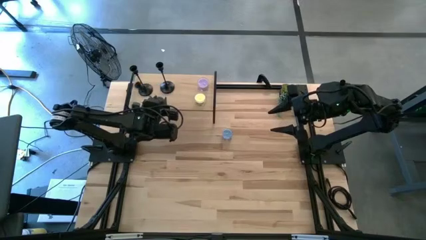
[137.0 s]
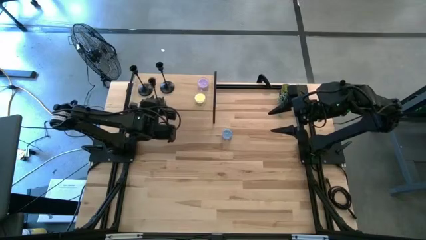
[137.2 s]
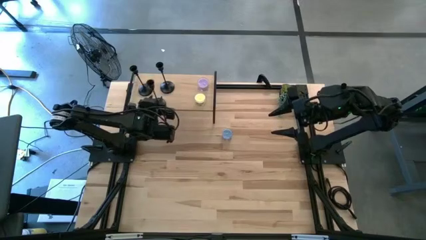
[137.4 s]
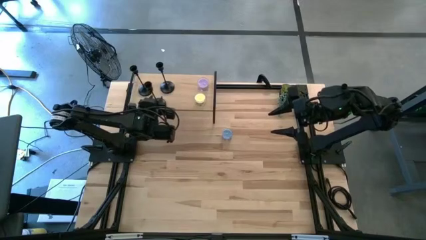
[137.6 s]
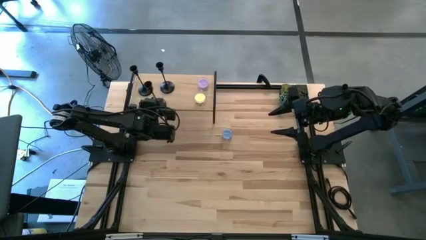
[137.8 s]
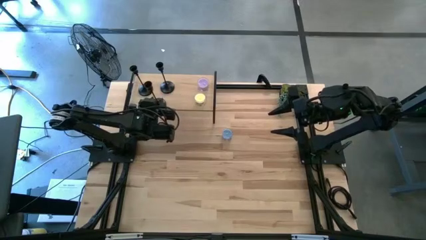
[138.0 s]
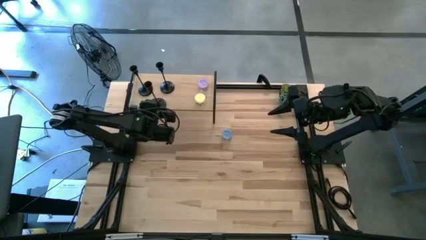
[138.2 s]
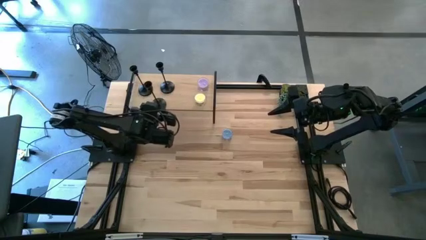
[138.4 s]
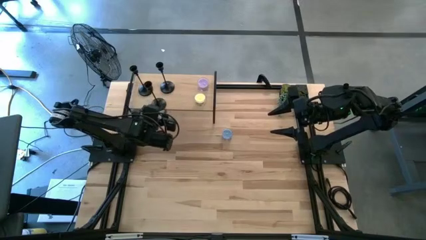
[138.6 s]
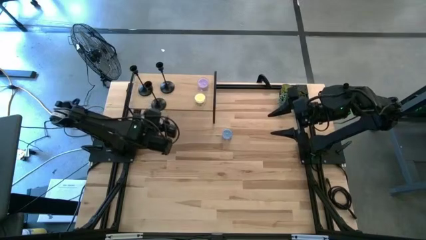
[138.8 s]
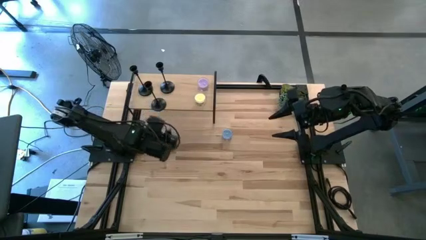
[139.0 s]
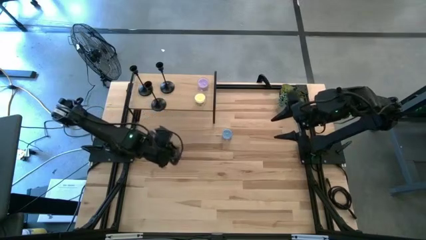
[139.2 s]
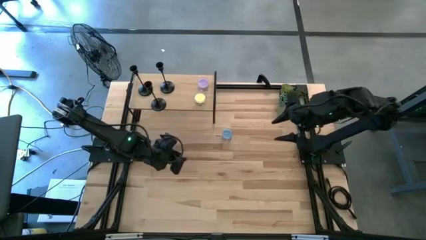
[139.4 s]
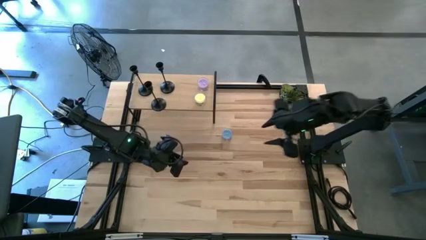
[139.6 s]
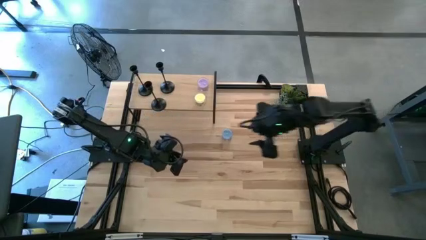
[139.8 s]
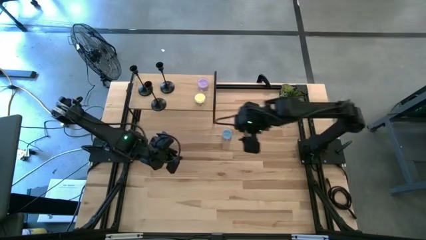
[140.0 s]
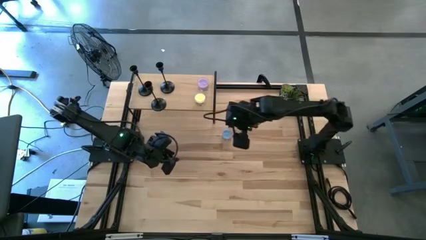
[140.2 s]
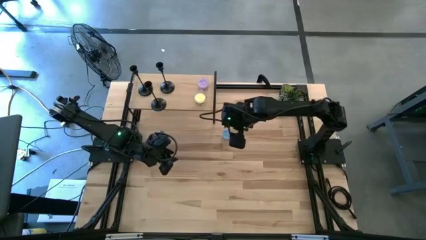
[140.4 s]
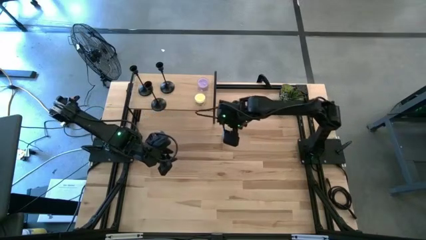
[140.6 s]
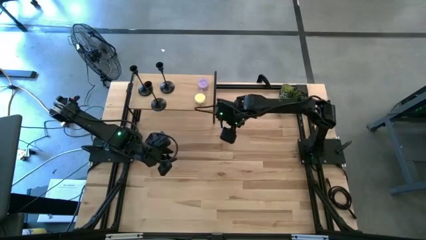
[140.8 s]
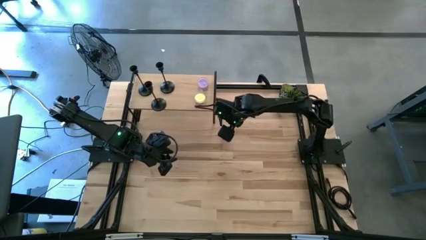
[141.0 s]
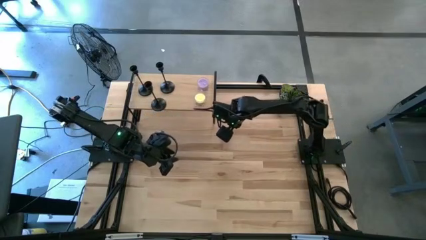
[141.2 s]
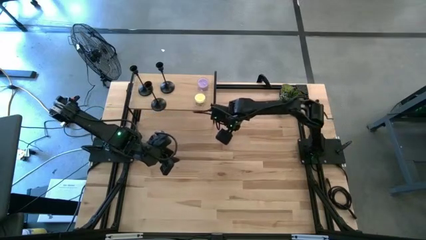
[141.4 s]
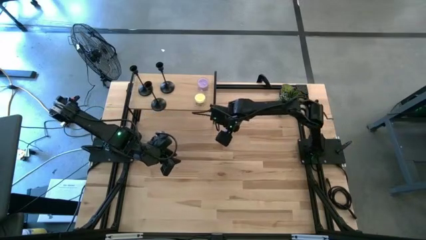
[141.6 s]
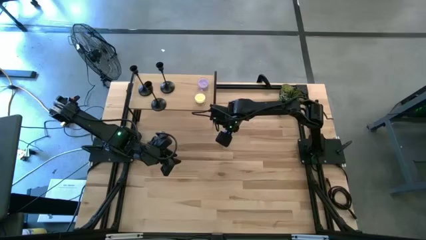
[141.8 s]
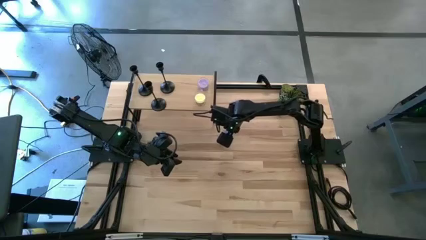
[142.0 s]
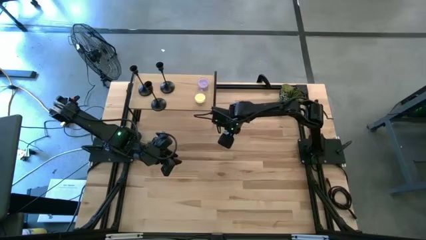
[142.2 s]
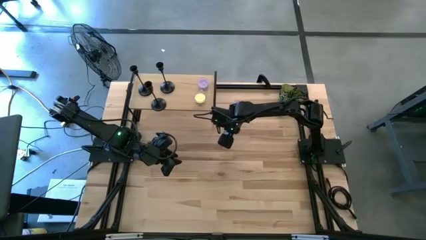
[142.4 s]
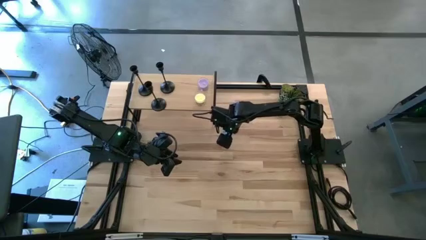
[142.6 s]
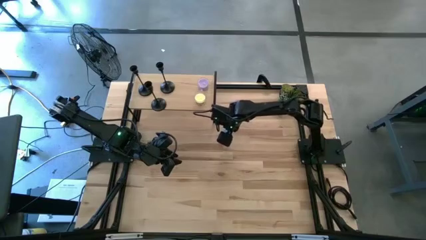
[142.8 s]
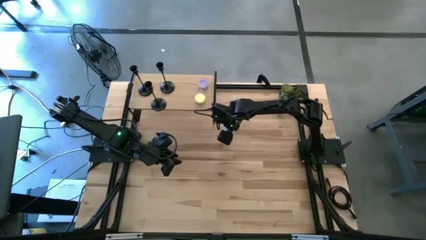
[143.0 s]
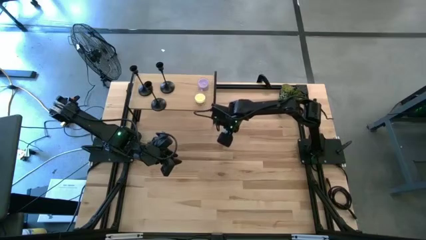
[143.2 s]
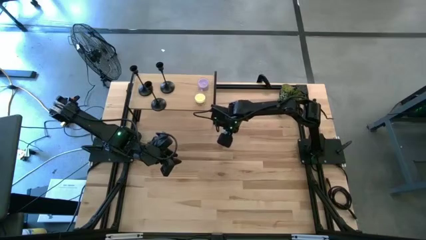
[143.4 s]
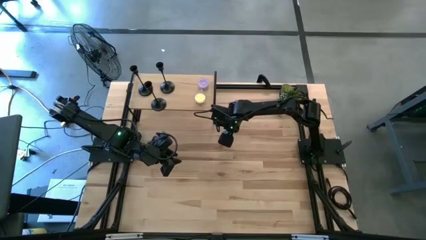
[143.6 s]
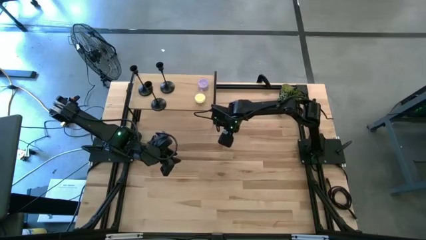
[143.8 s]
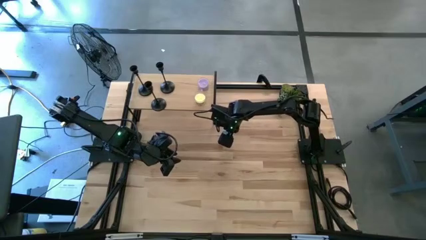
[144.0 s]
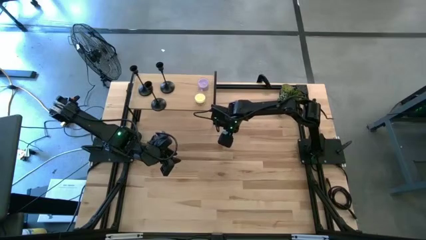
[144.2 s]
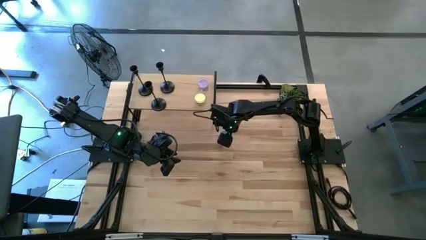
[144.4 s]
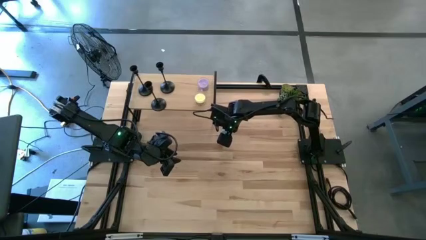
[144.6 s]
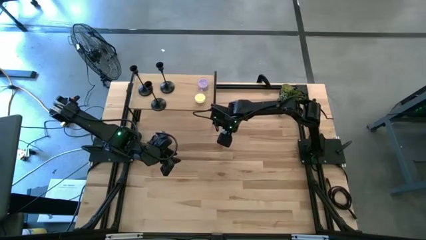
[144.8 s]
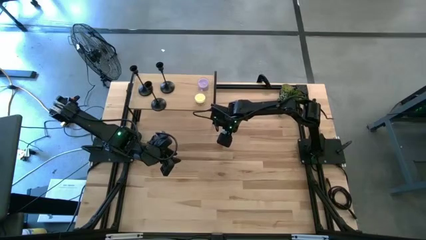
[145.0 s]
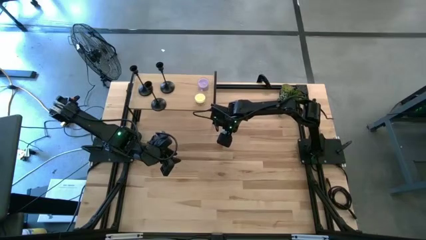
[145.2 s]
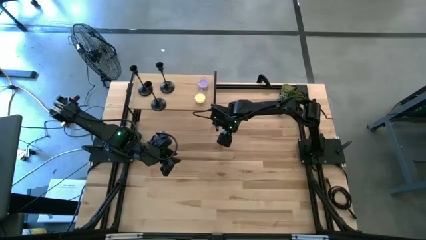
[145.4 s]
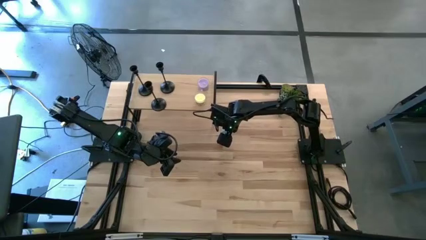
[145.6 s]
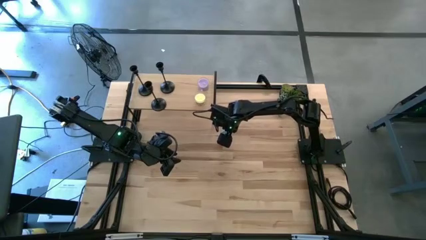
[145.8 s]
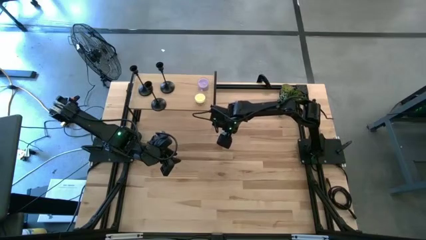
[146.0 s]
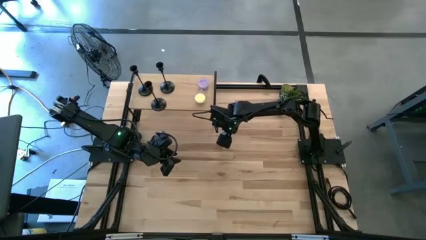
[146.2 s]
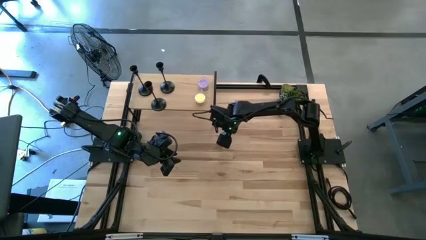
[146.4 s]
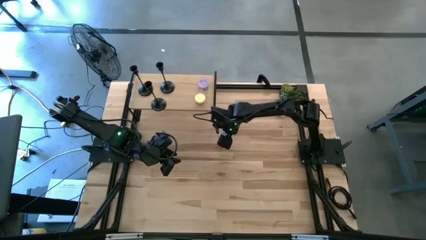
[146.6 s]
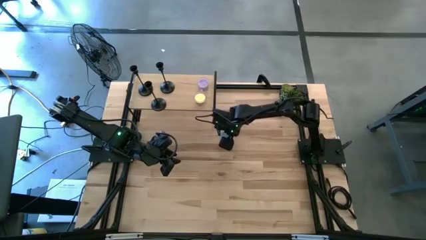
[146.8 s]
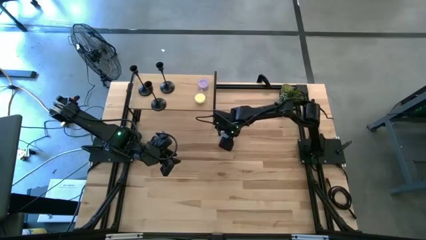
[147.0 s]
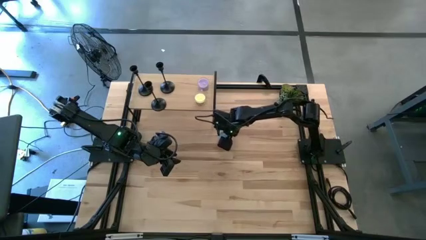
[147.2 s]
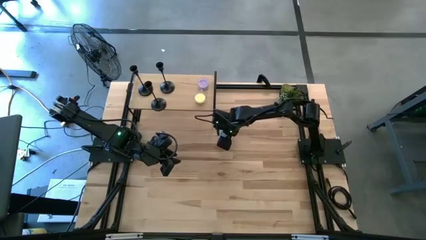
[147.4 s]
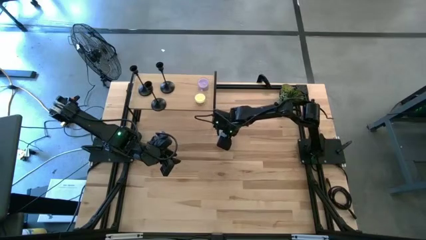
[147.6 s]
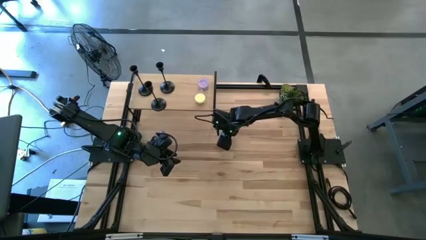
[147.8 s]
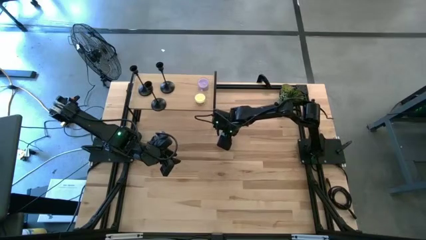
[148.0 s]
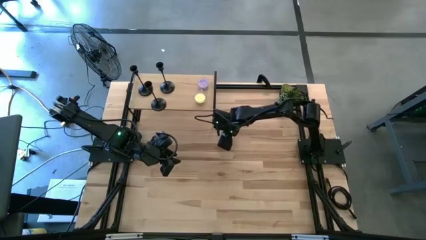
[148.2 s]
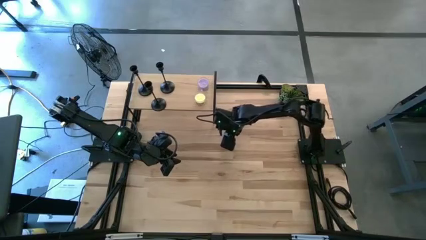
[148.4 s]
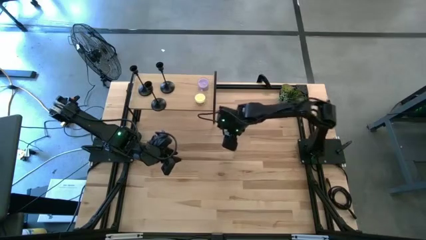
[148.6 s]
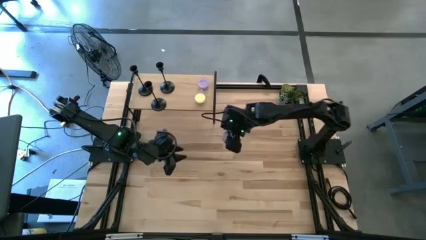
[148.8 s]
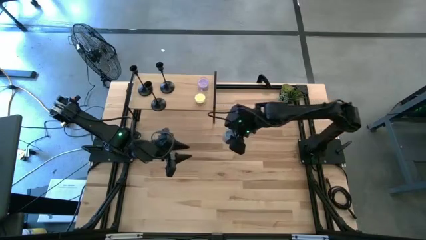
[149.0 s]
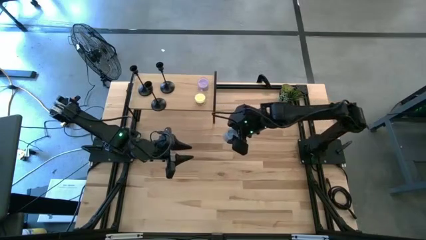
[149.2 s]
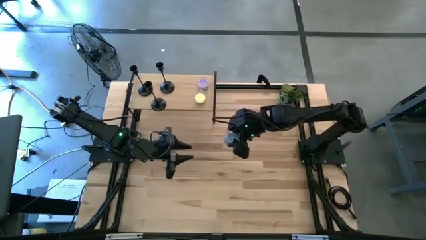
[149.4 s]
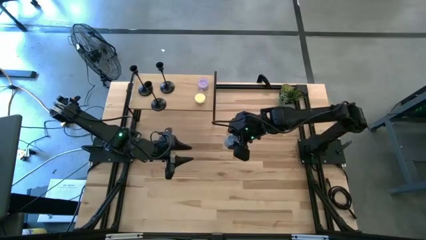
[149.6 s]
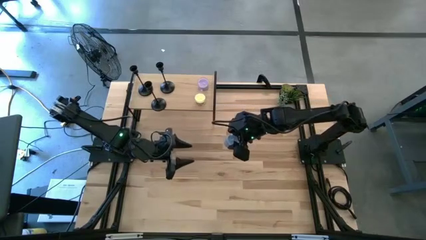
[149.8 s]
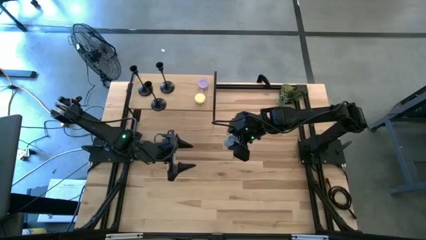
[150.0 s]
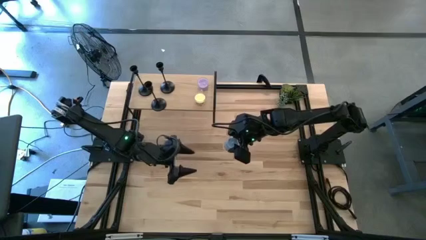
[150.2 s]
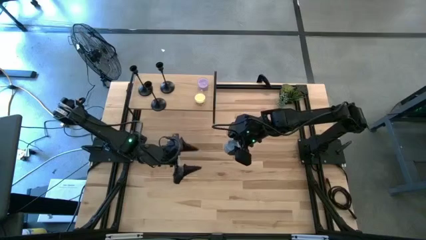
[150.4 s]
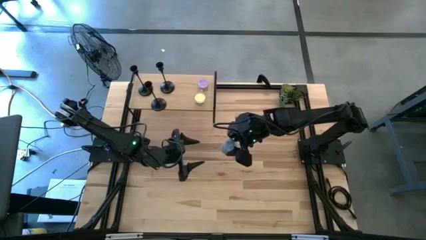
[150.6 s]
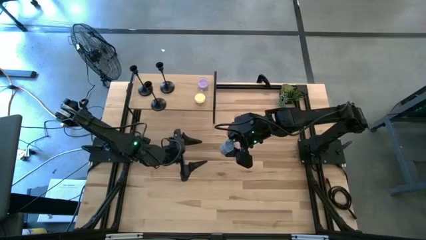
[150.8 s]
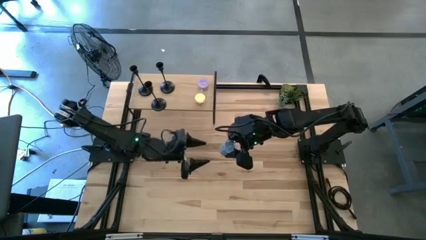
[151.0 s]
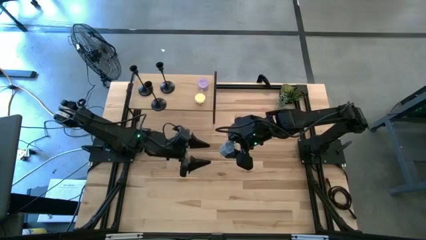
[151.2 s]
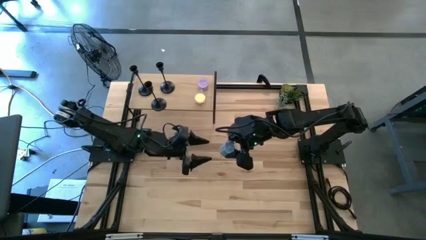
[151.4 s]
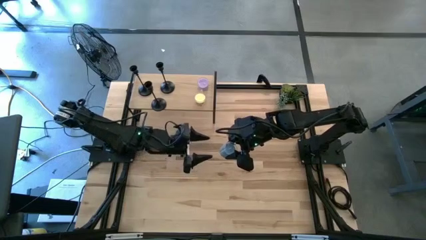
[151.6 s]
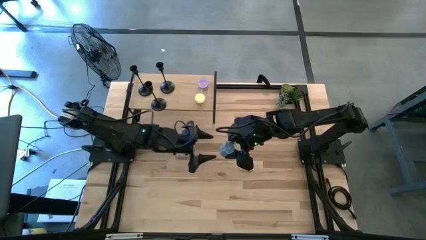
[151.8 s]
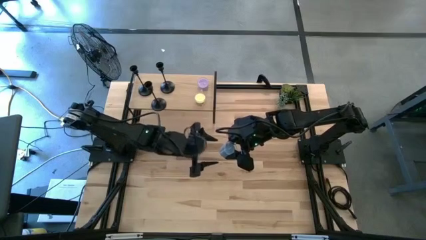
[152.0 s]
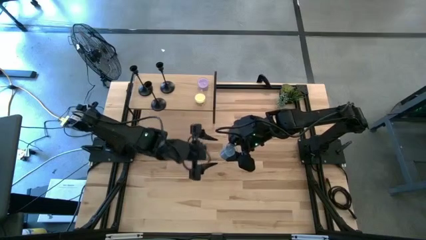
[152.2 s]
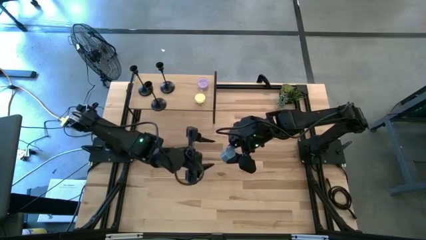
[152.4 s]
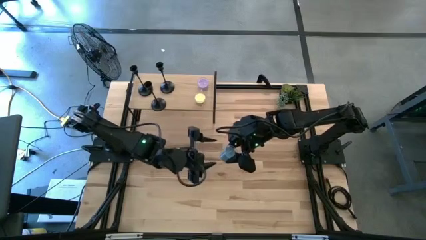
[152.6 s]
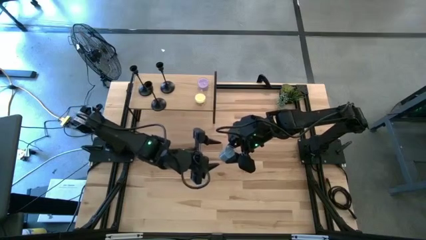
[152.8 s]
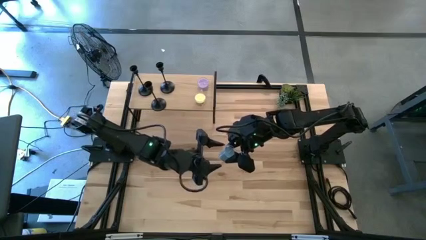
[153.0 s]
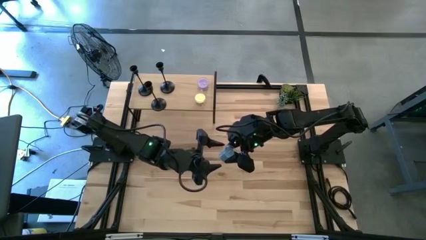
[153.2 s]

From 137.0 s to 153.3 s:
Task: Pick & Place candle stick holders
Put the blue candle on the shelf
